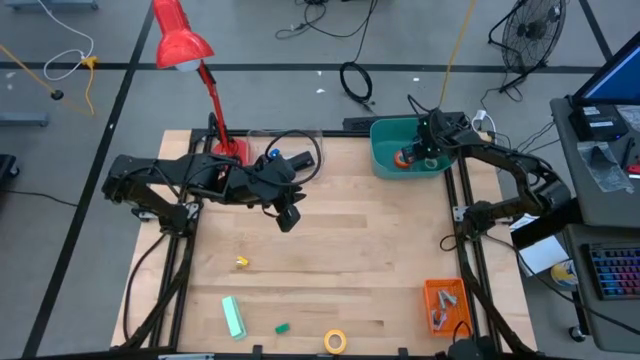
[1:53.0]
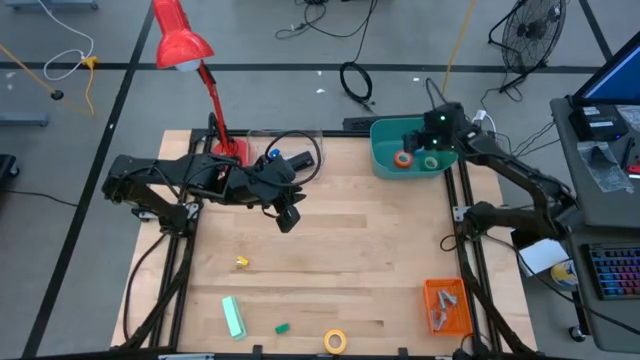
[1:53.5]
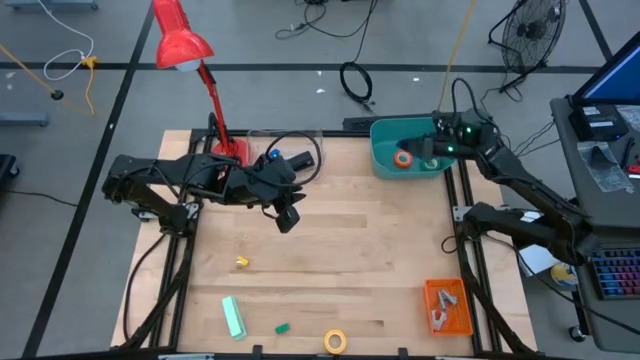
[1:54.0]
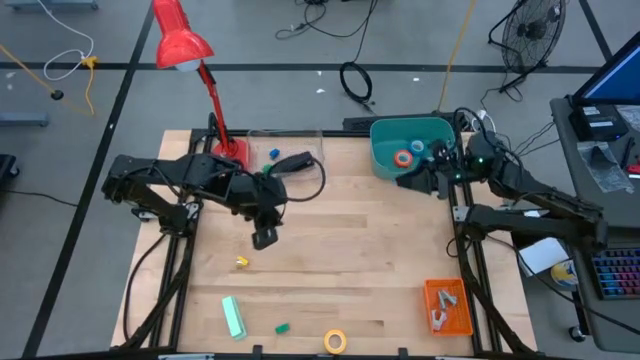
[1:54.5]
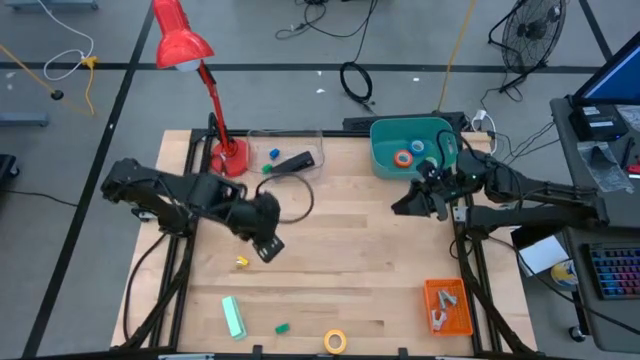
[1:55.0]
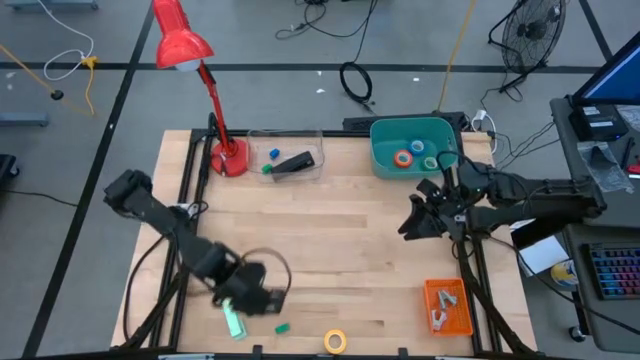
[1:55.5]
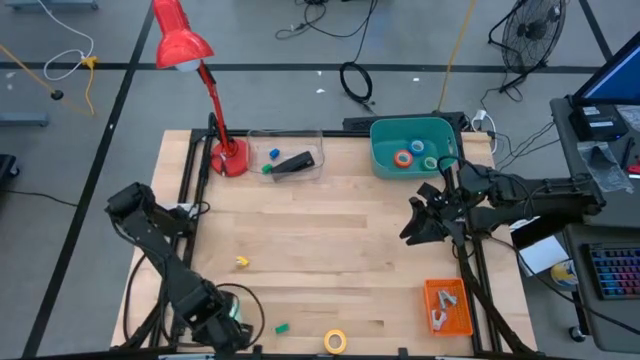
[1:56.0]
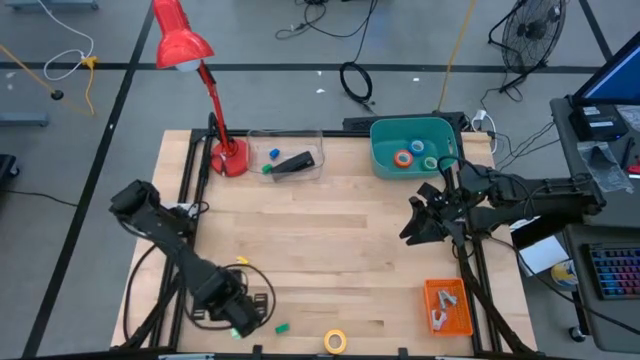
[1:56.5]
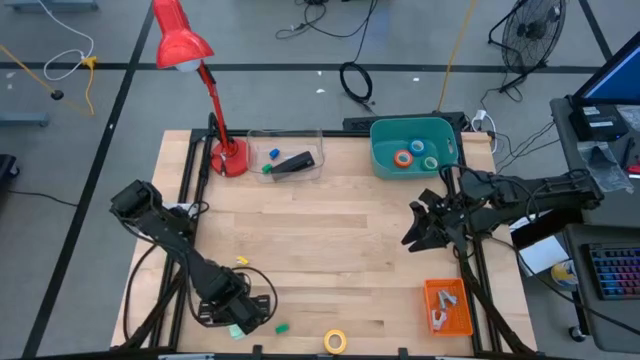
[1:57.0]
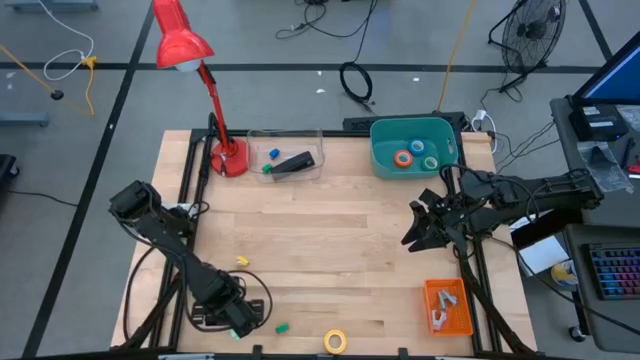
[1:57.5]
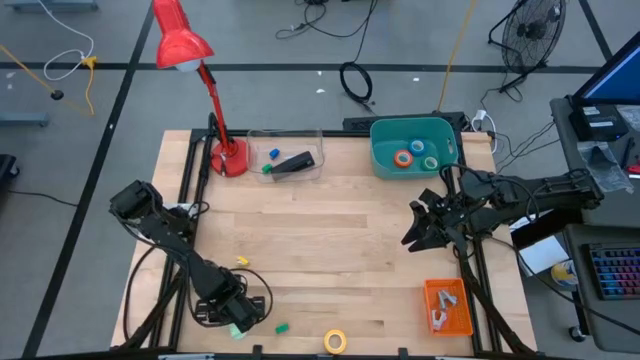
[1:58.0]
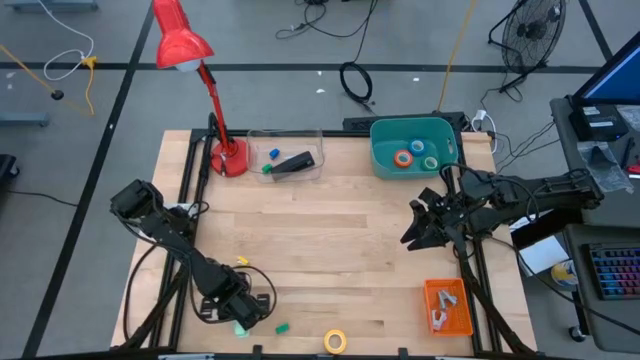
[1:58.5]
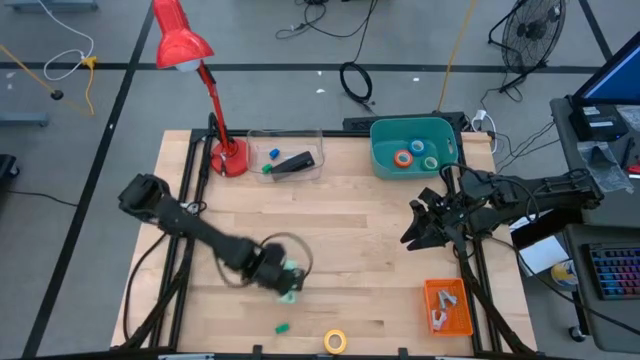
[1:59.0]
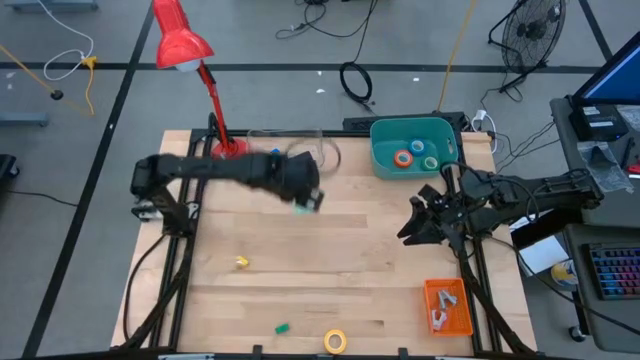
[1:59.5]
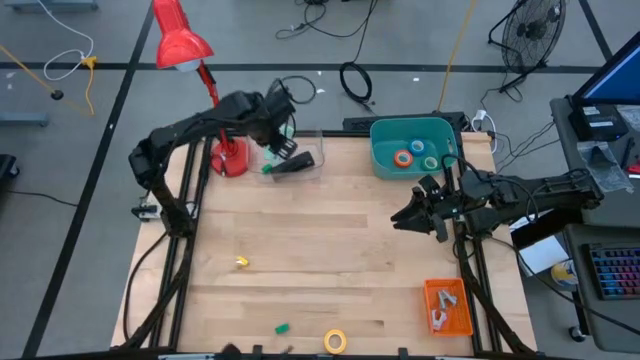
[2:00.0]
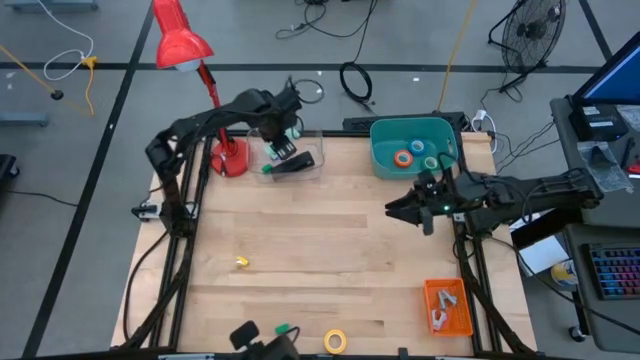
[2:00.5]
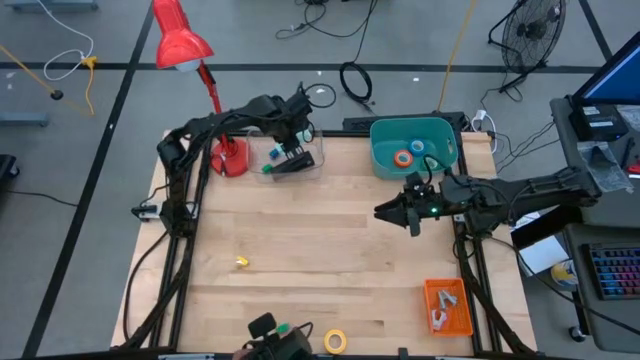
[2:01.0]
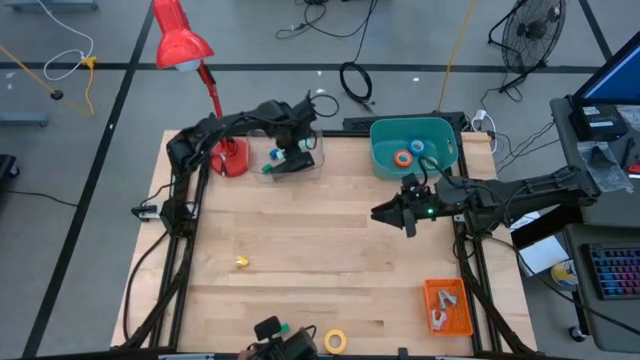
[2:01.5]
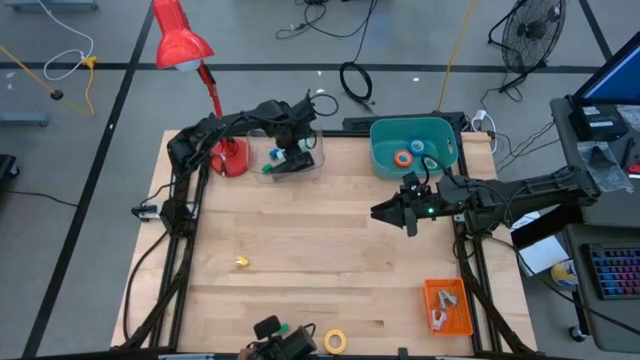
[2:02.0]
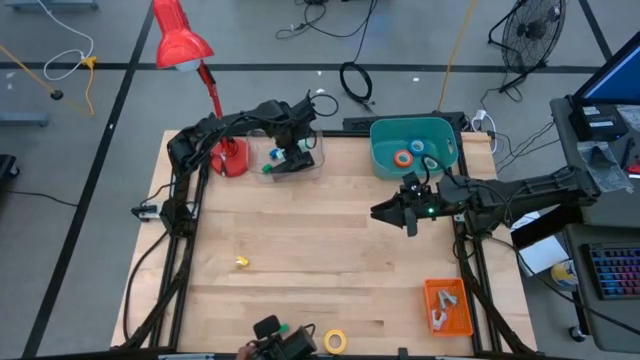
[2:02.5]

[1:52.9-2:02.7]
Task: Pick and place Stapler, Stapler remover, tape
Put the big light blue stapler into the transparent bin

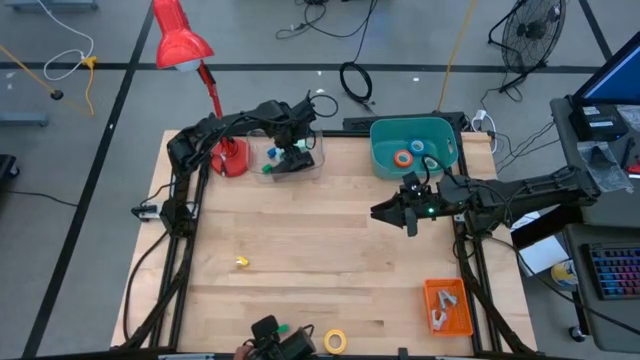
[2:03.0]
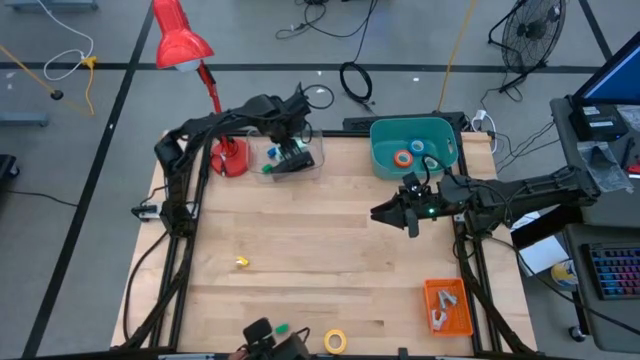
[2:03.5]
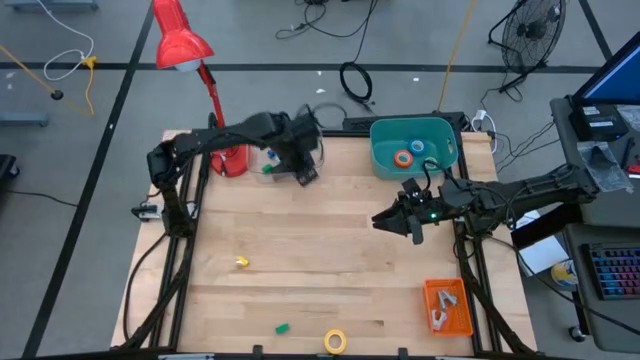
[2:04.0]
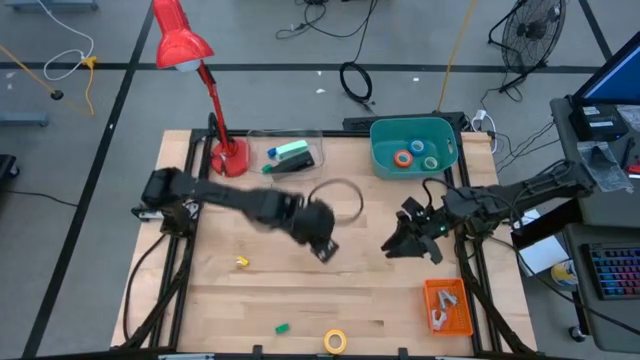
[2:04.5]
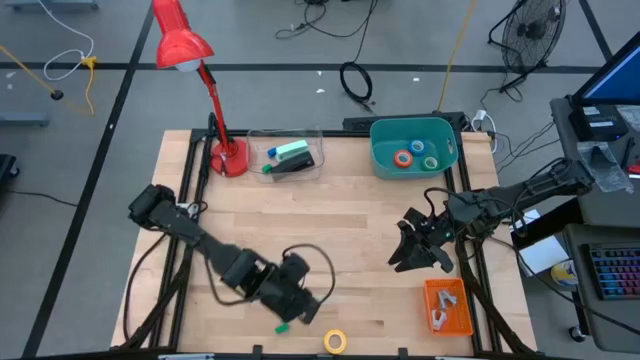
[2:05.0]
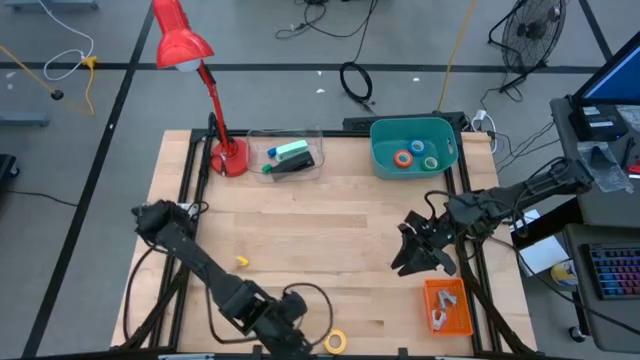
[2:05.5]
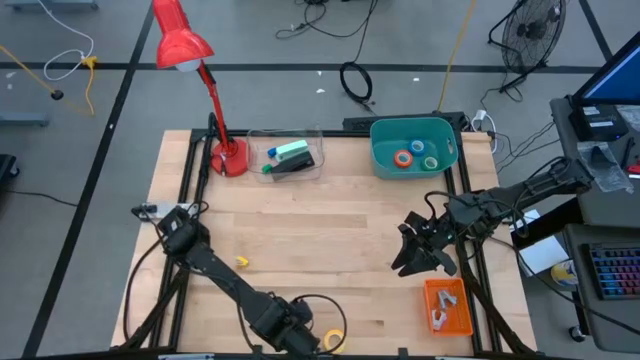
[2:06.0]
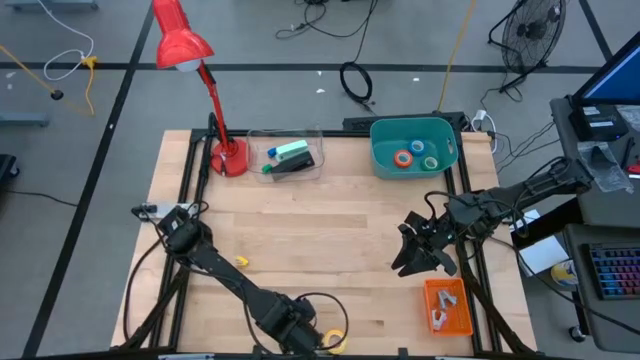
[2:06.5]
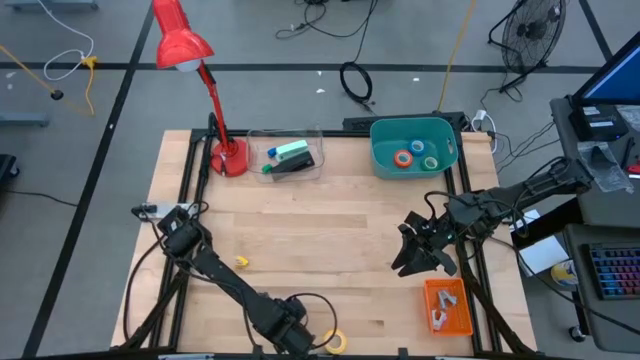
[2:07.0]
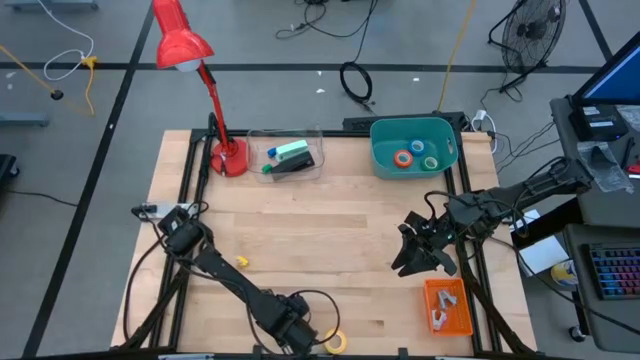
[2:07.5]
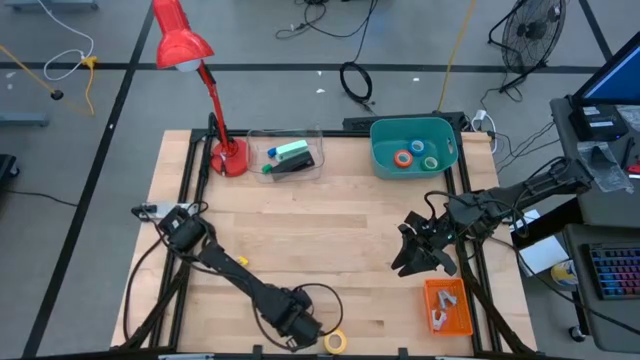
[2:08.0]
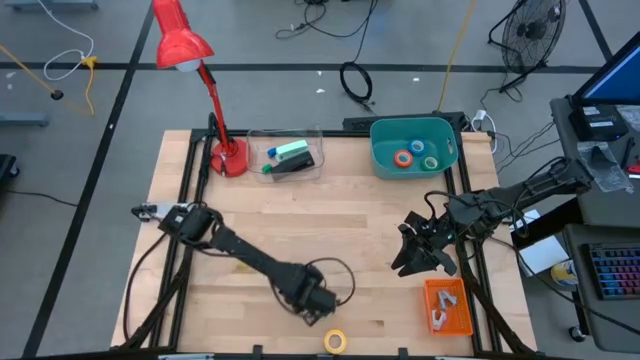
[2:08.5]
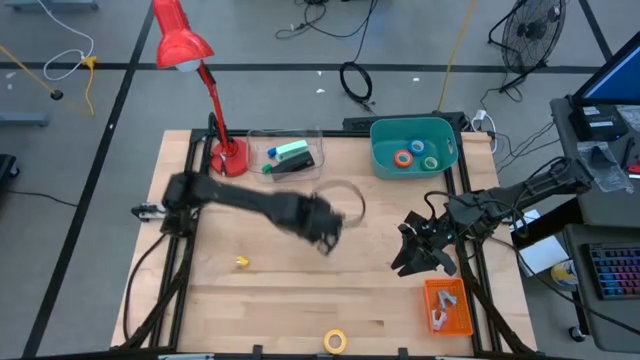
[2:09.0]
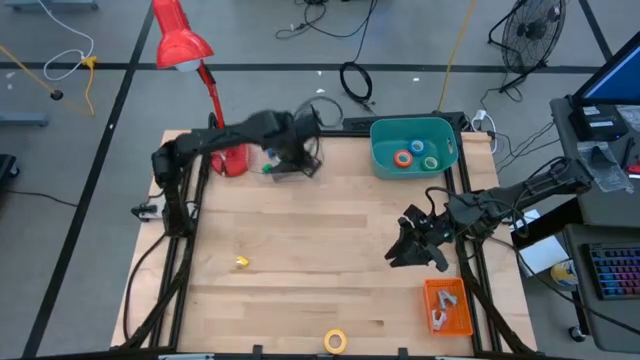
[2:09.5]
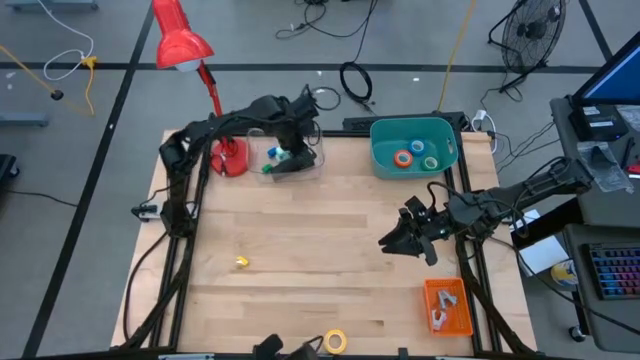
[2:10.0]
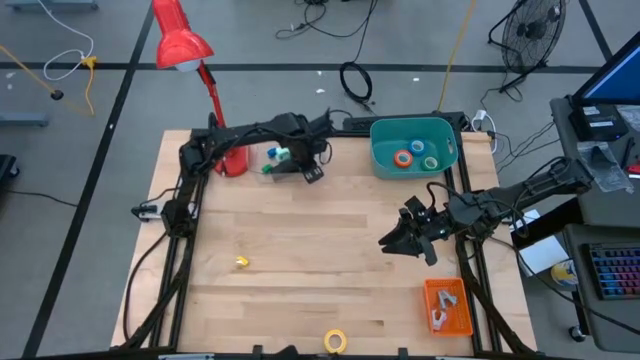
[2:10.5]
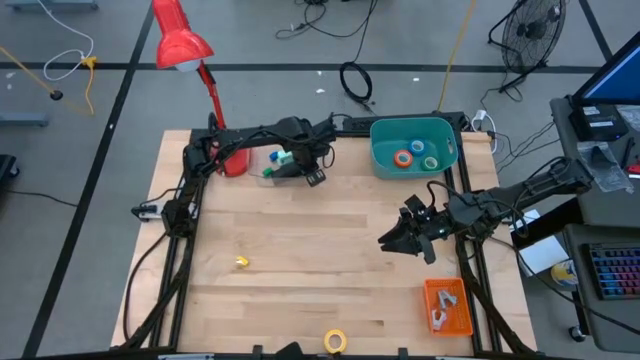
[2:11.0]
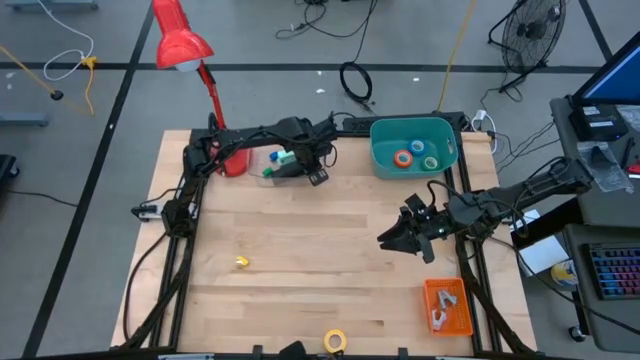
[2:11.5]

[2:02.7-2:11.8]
Put the small green stapler into the transparent bin

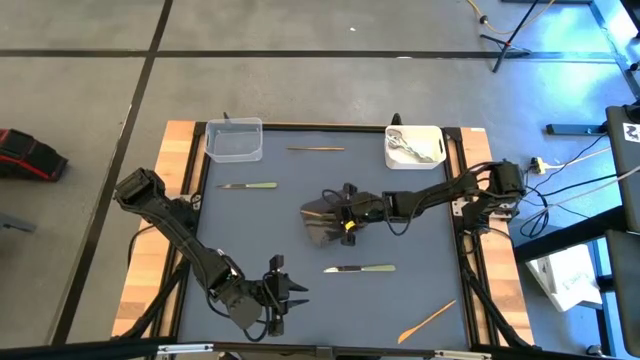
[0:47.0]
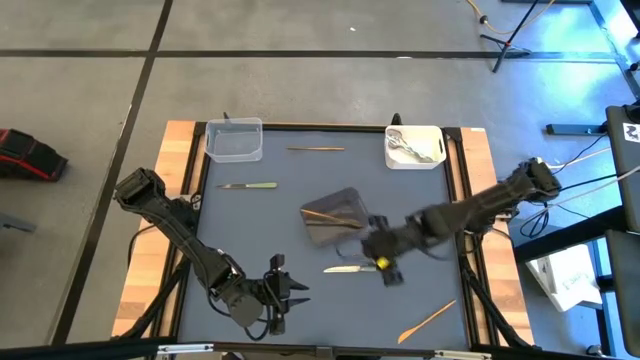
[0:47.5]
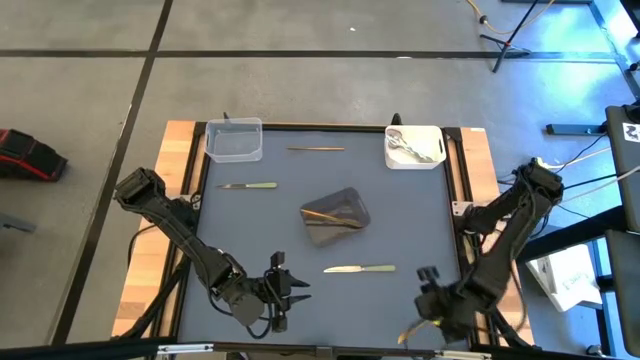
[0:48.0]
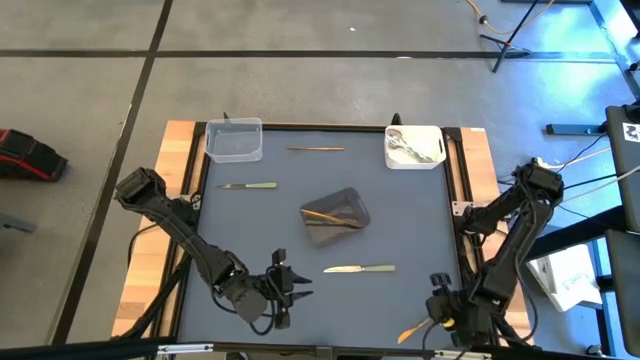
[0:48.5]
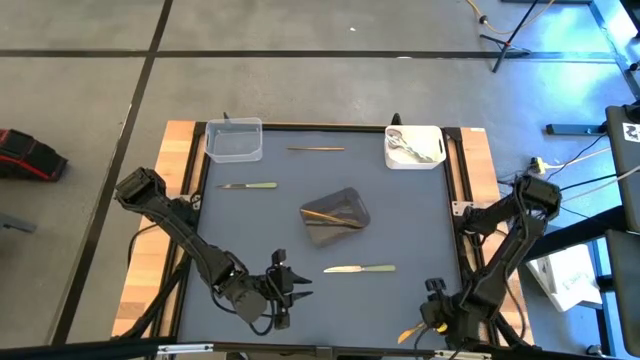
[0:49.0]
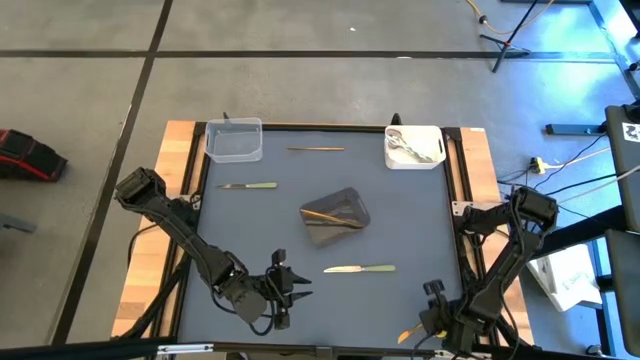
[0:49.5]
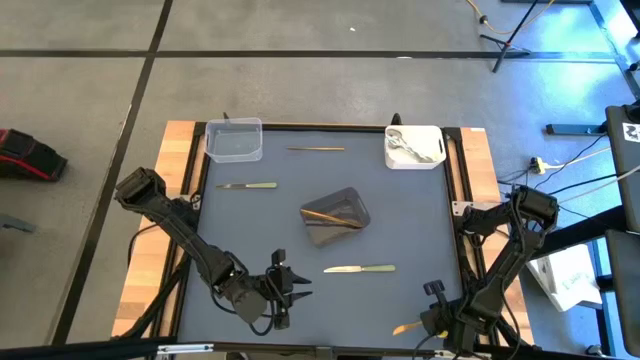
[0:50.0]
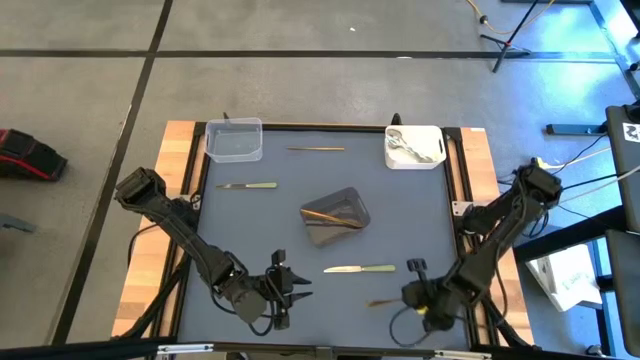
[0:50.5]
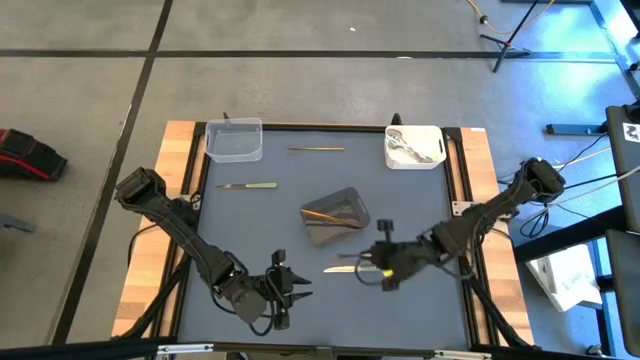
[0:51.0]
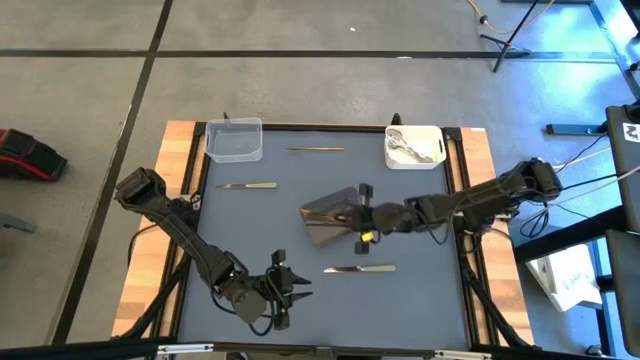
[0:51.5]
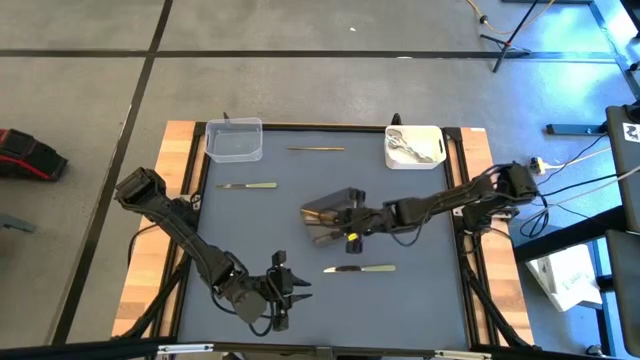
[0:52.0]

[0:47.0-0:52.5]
Task: Sort silverware by color (type)
Put the gold table knife into the black bin
